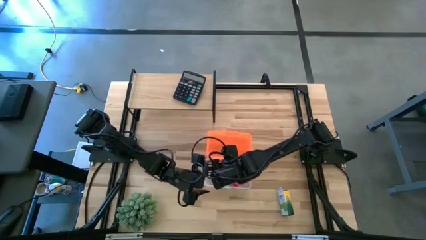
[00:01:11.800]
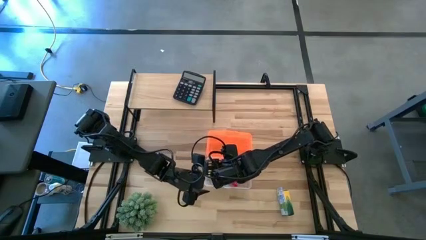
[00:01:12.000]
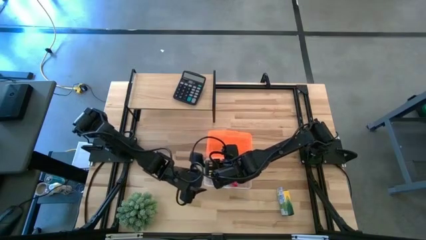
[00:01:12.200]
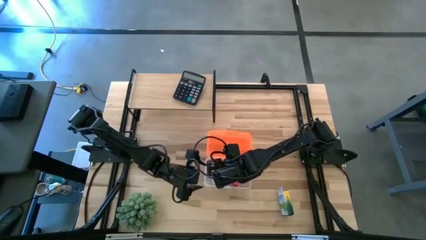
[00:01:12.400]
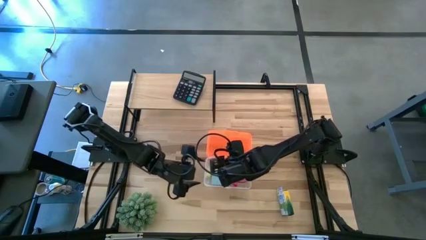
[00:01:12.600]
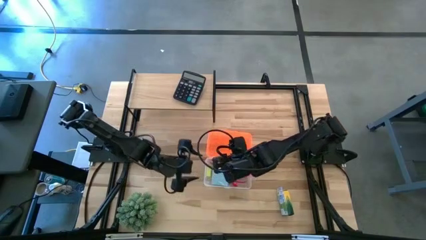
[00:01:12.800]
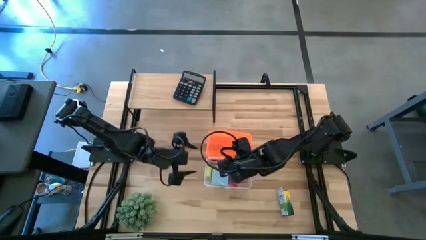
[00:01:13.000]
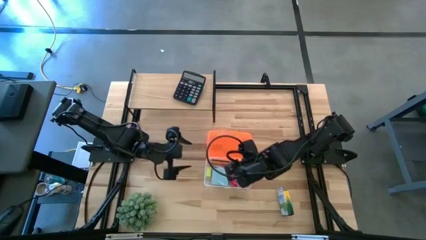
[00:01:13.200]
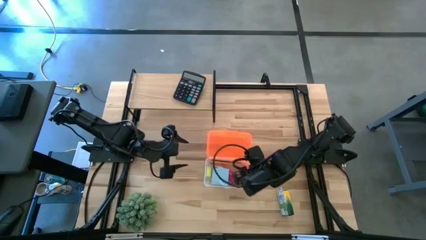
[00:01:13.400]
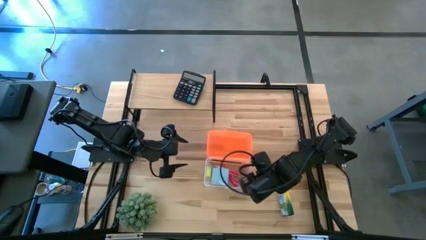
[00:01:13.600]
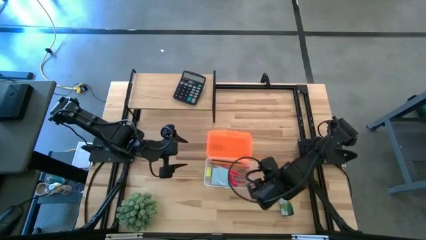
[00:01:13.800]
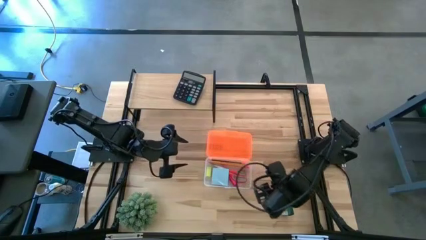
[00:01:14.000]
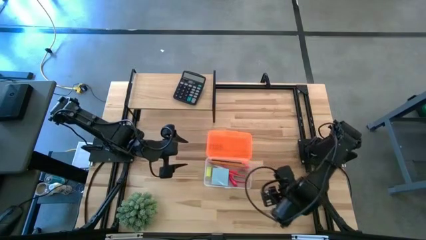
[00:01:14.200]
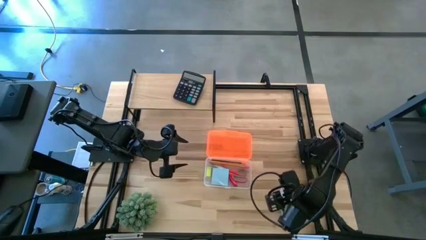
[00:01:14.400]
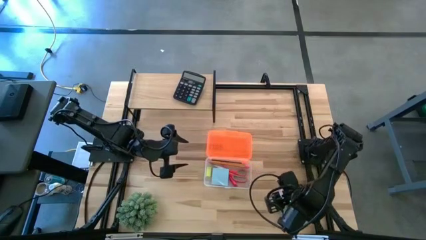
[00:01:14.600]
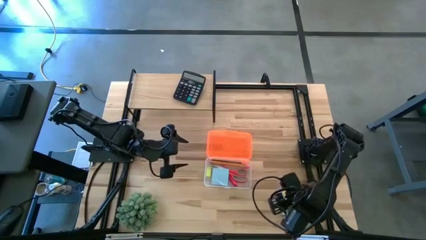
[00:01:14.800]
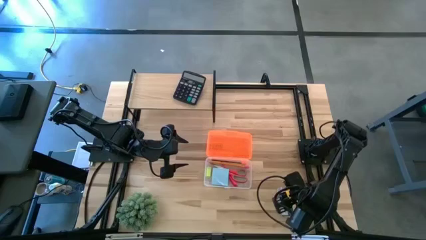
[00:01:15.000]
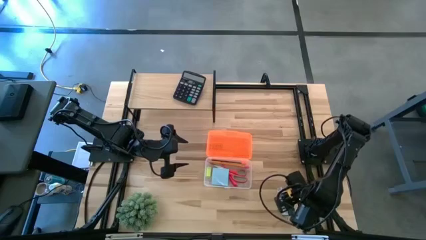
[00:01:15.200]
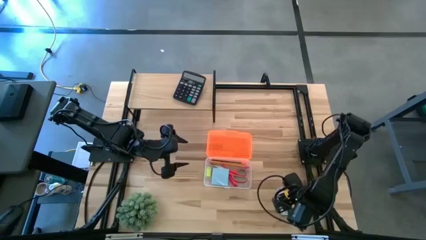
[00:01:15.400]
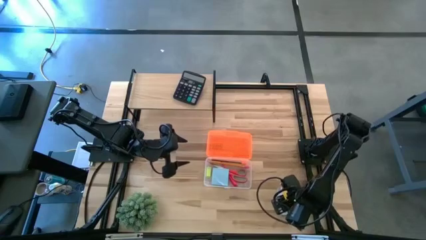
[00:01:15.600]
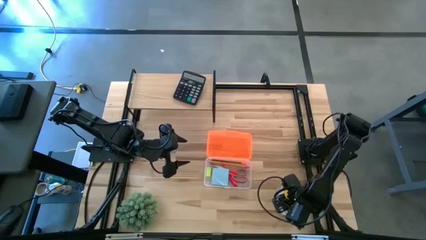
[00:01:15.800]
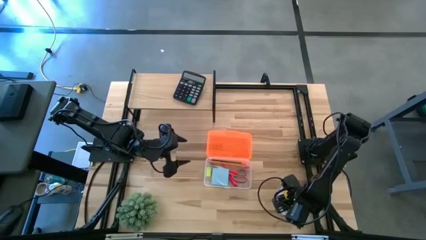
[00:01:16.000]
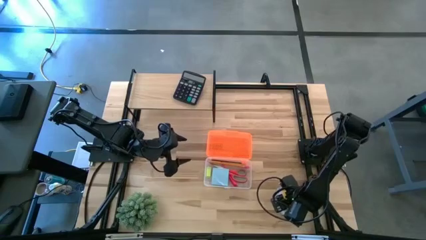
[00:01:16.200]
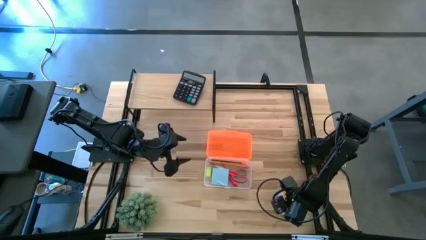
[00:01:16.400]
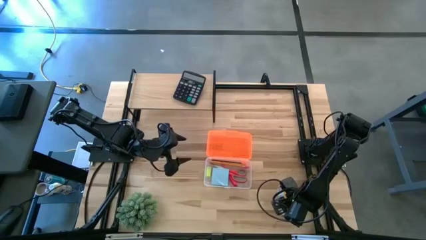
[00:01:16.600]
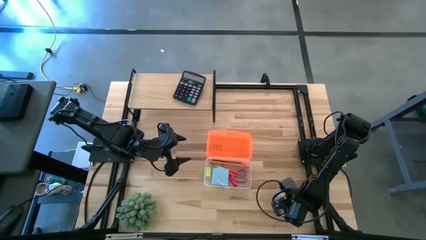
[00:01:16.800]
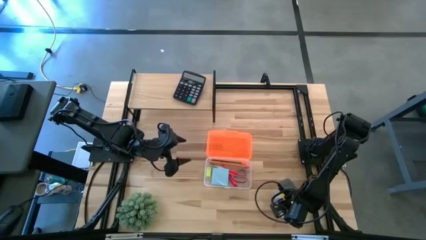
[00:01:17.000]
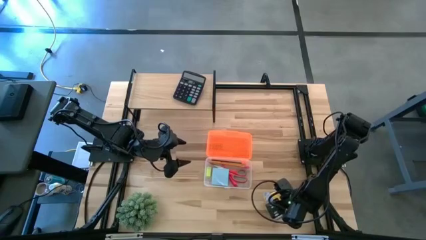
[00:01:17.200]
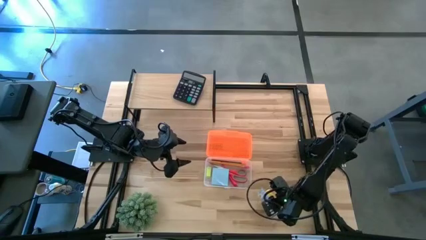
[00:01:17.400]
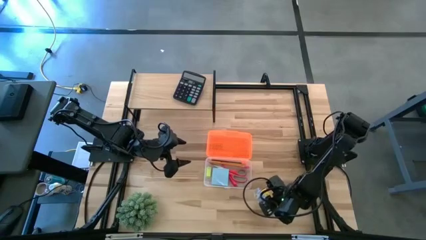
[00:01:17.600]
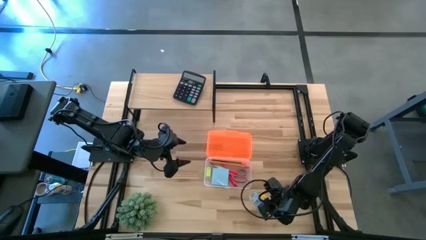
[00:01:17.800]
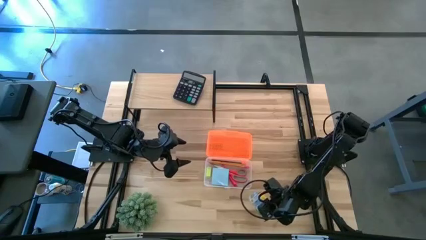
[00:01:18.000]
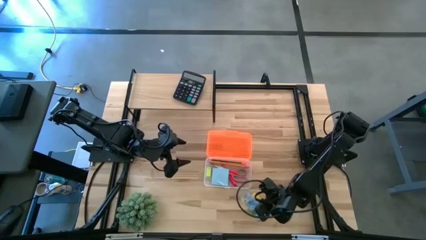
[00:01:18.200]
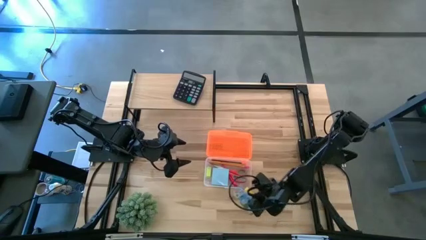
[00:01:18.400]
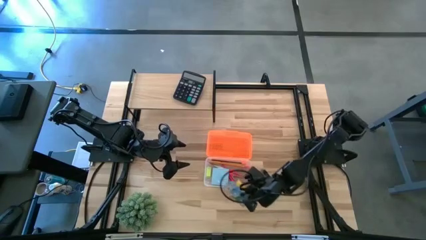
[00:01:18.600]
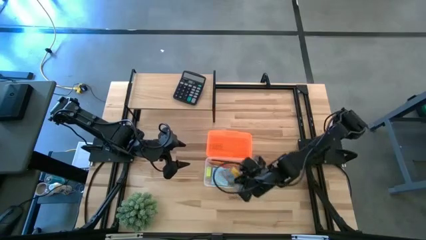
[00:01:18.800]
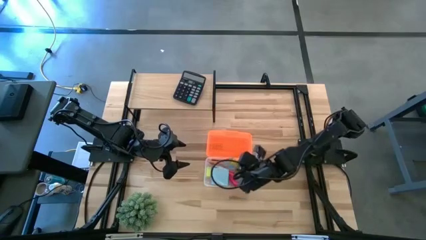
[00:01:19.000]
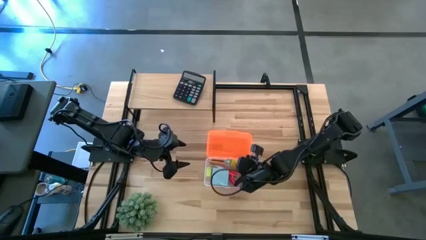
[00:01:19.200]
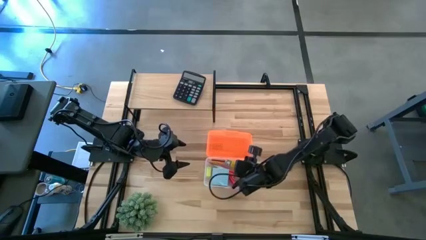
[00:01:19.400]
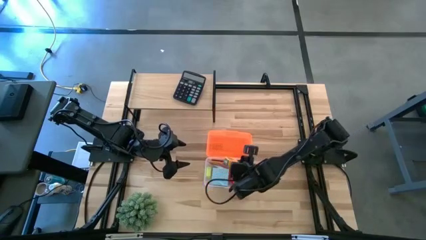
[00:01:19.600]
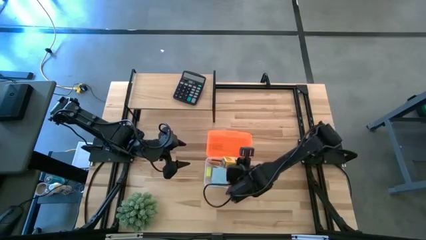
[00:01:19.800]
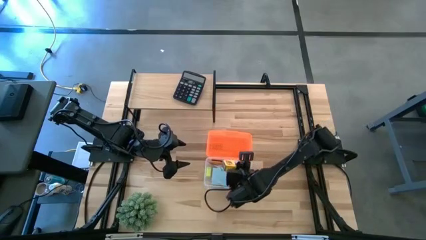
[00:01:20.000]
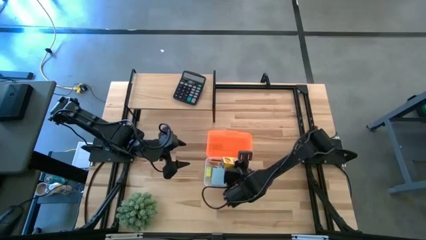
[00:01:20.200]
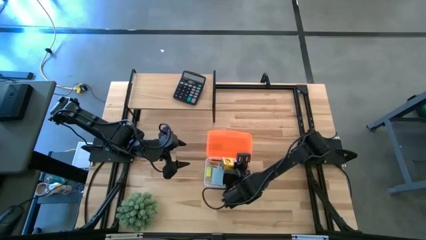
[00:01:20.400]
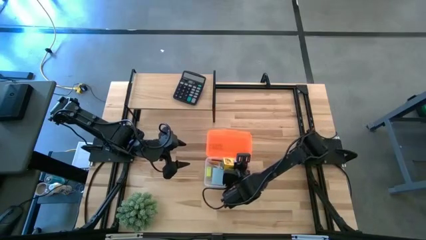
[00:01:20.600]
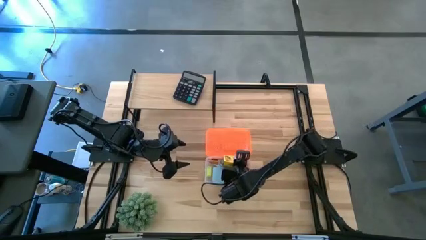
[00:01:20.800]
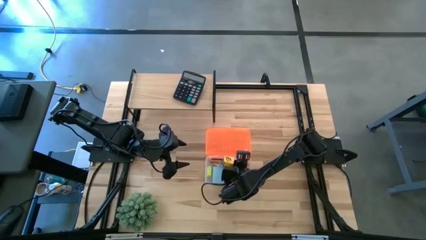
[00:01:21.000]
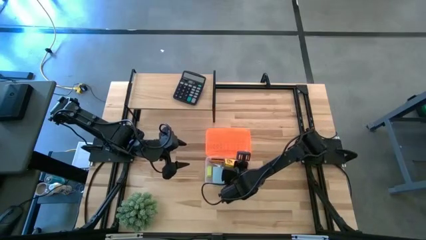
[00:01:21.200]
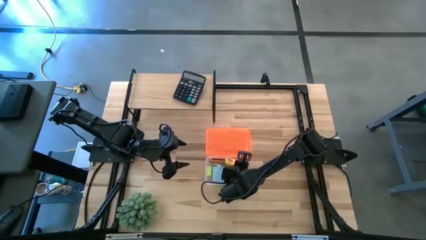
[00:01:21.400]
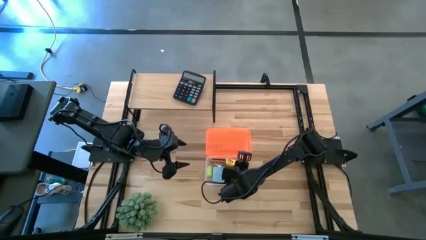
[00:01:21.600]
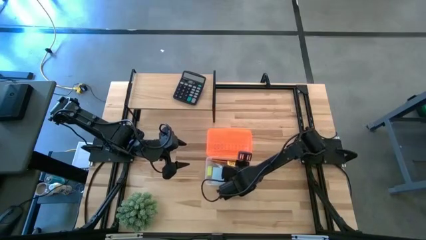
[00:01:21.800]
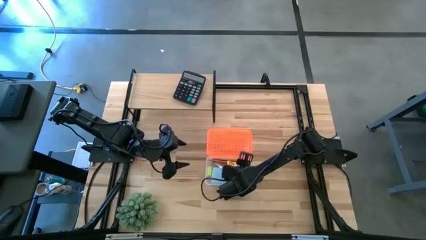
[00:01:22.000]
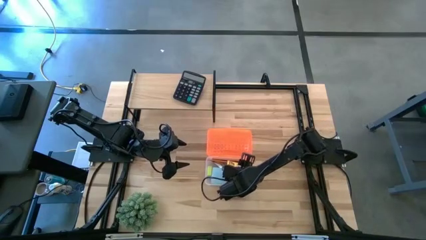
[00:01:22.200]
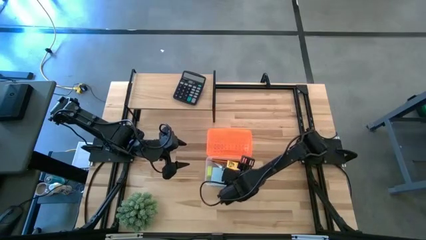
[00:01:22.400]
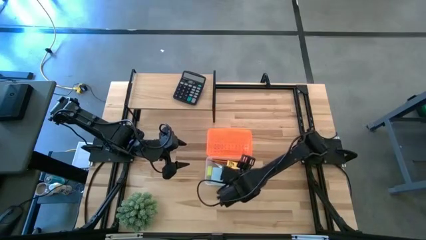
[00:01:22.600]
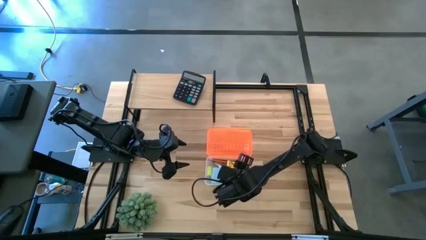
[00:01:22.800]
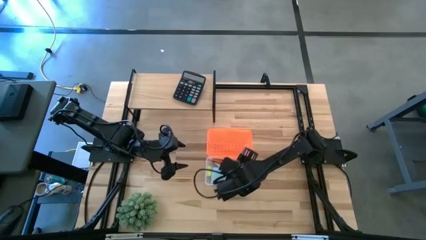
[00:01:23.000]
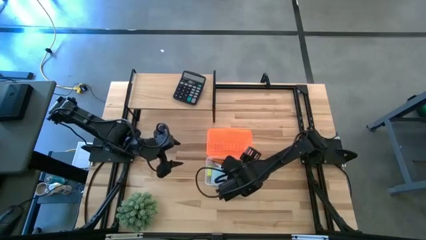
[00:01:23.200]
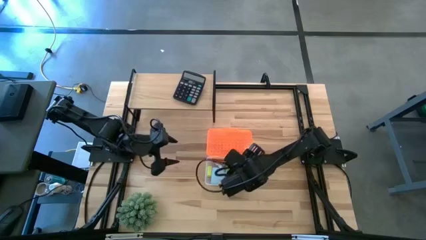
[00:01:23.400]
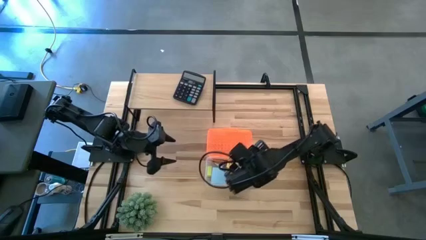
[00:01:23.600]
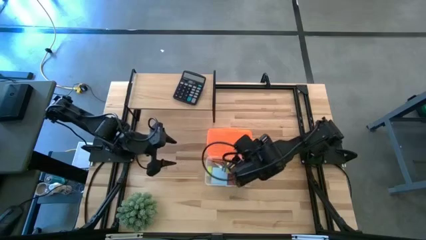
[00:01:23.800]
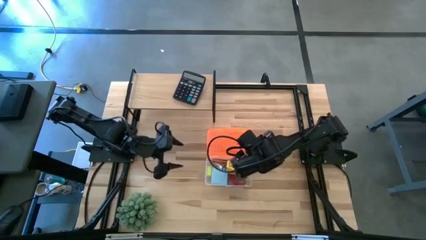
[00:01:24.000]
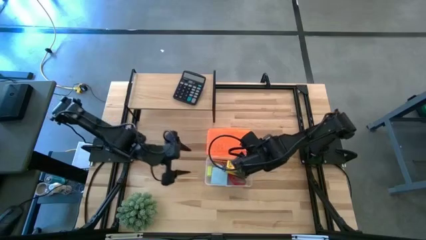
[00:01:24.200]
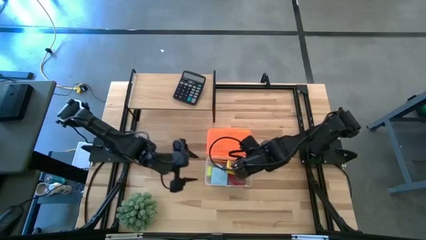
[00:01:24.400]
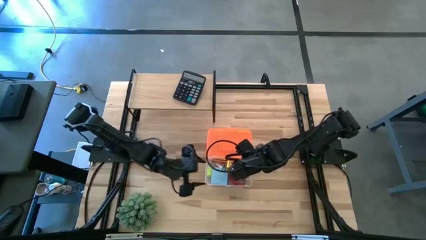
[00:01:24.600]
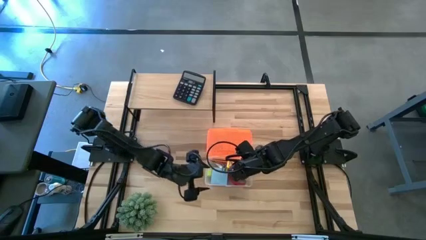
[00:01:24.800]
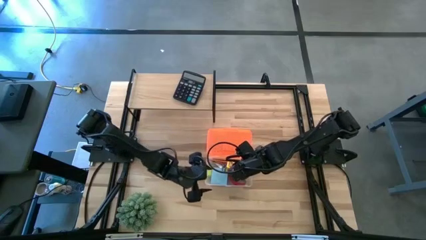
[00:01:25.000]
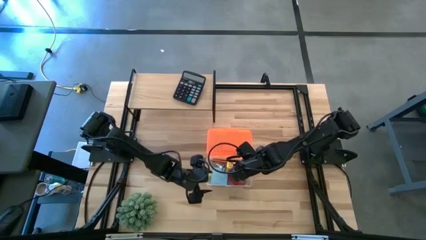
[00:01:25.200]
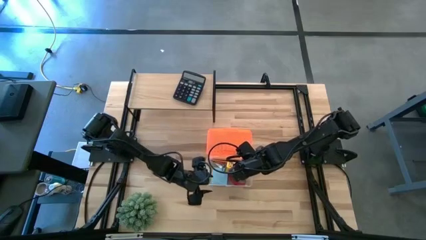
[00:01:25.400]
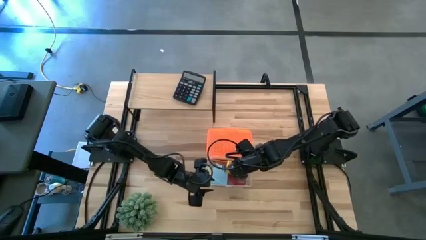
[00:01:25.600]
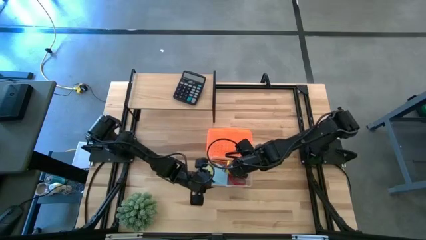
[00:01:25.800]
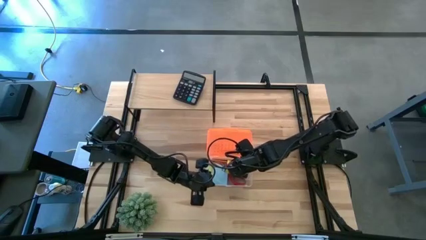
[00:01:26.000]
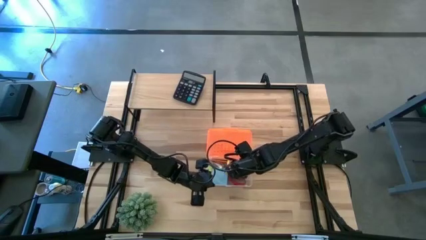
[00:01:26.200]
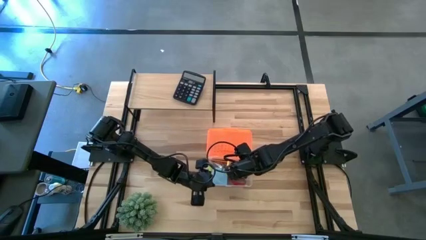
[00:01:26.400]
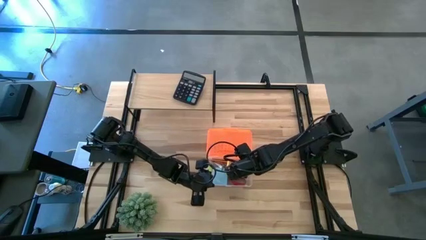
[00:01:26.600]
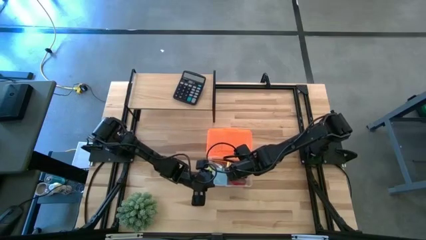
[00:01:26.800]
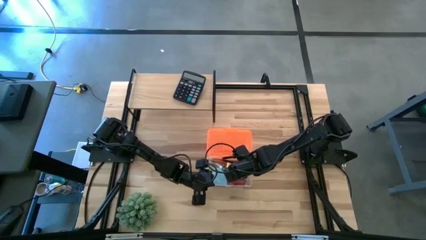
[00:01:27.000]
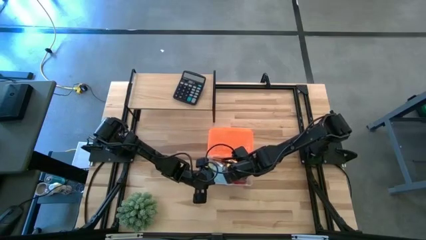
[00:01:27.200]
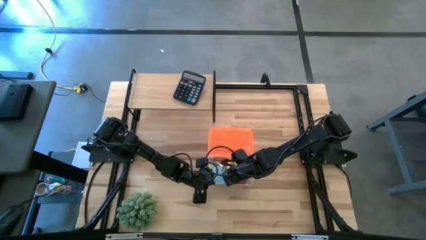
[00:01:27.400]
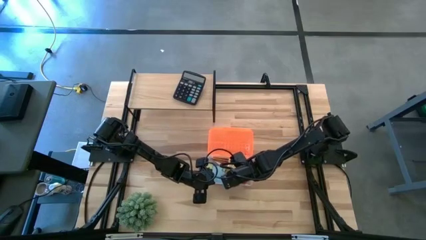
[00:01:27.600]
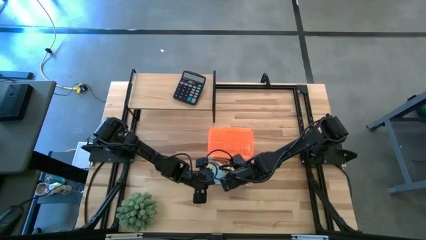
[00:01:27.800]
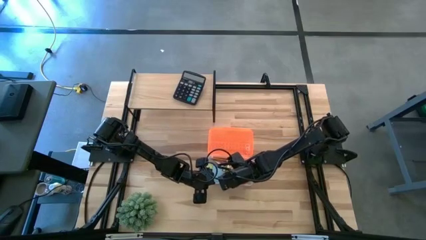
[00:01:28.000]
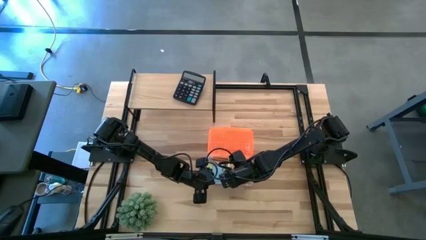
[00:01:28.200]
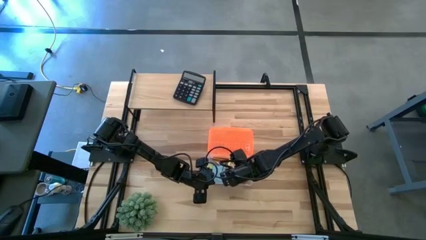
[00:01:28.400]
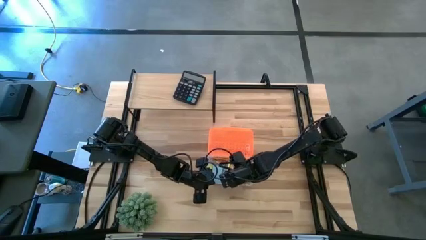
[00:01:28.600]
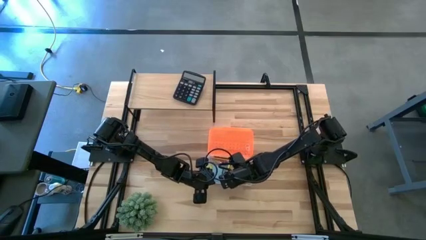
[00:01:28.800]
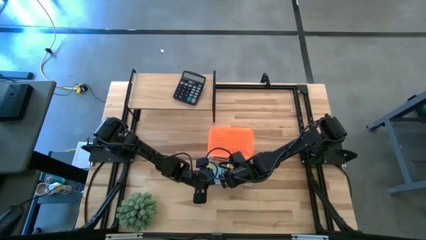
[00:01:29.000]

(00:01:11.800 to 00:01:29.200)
Task: Pack school essentials
Put the crayons box into the supply box
